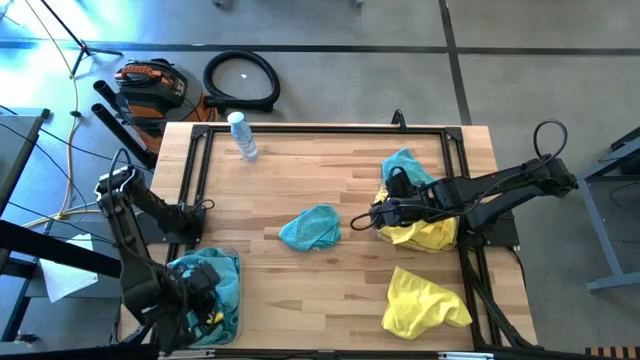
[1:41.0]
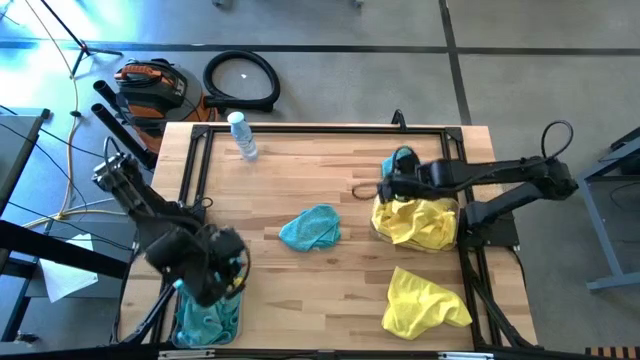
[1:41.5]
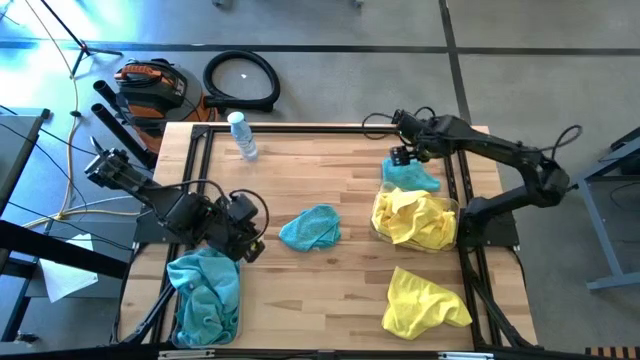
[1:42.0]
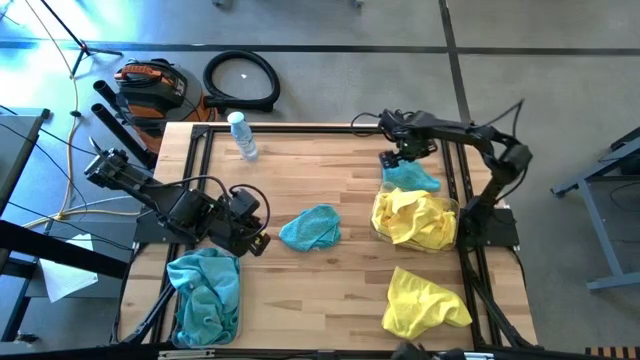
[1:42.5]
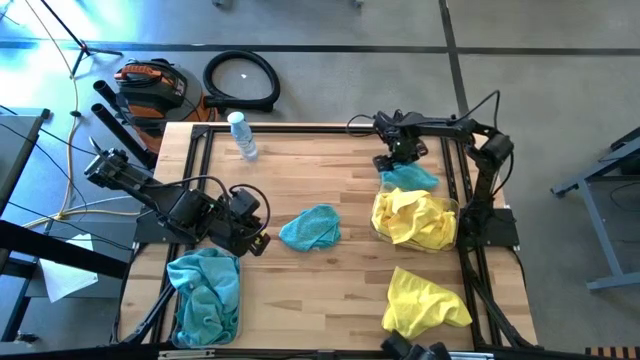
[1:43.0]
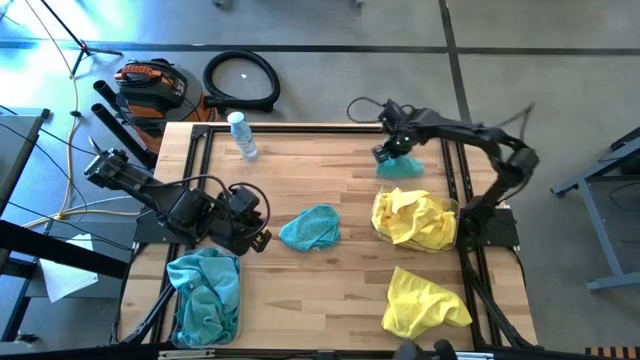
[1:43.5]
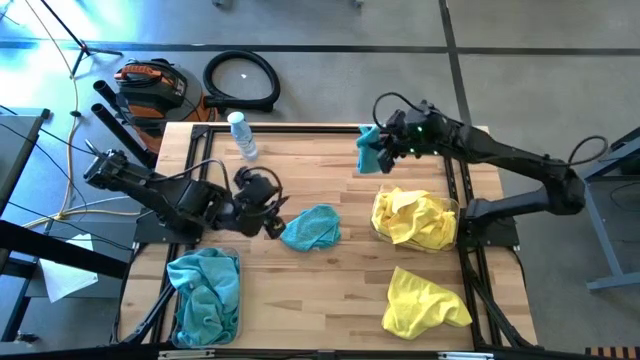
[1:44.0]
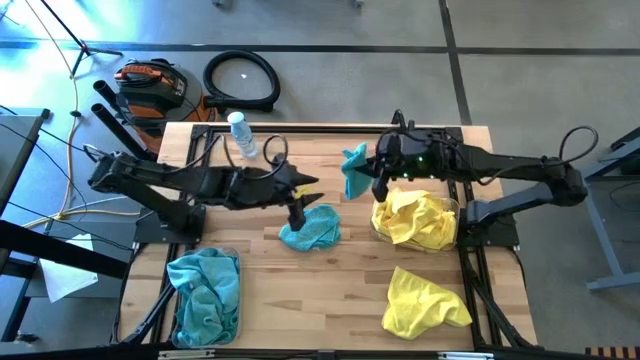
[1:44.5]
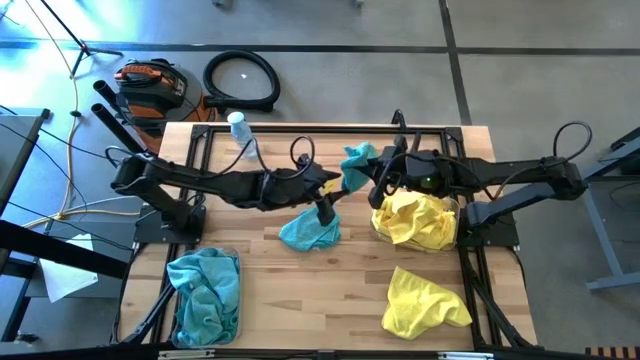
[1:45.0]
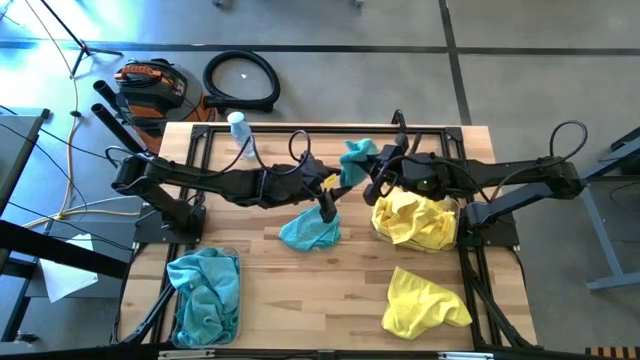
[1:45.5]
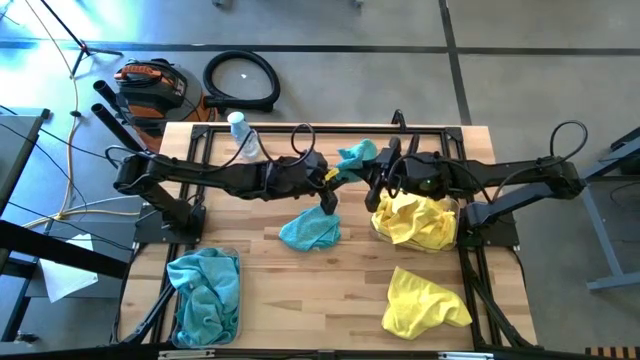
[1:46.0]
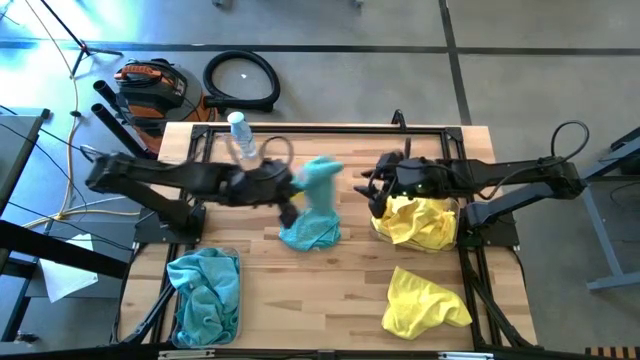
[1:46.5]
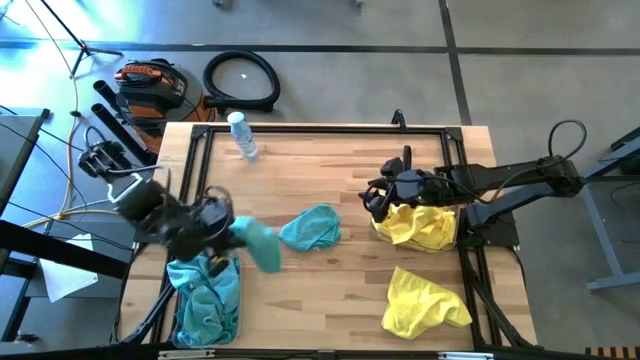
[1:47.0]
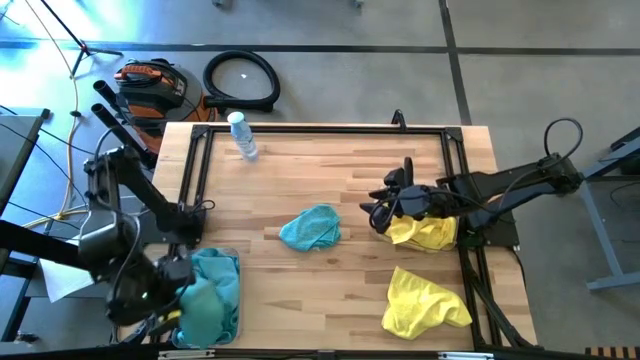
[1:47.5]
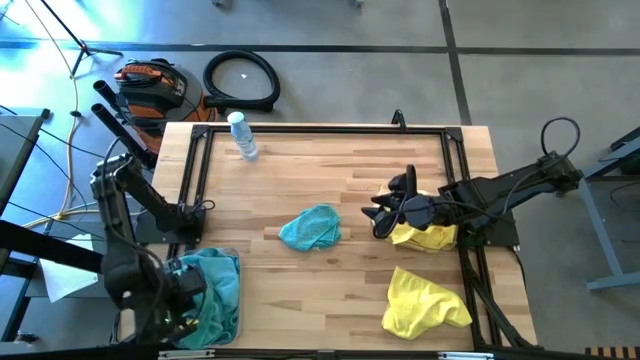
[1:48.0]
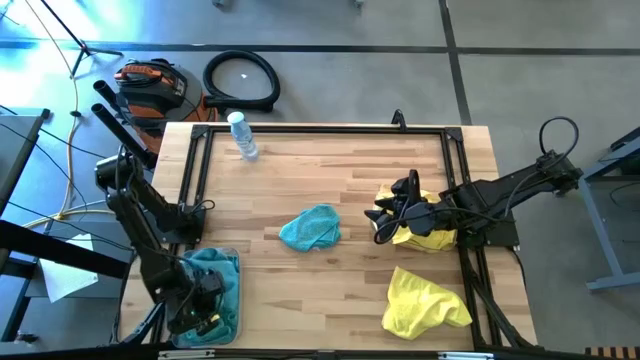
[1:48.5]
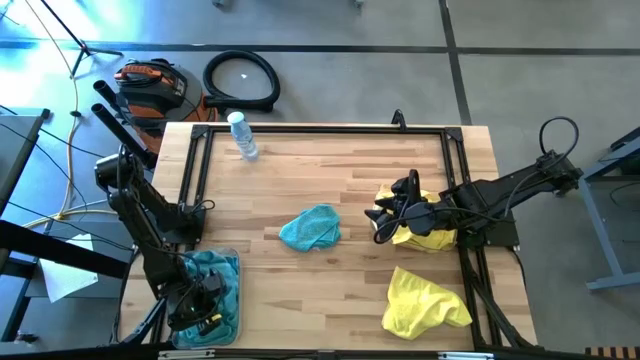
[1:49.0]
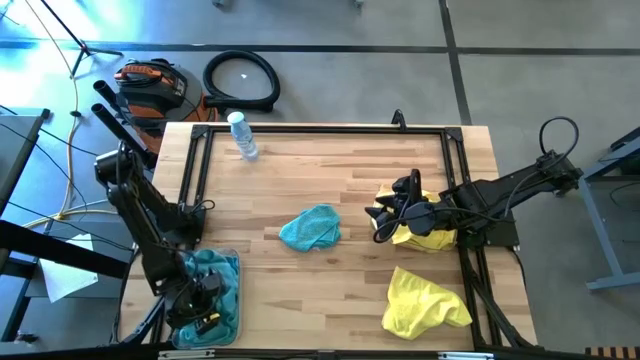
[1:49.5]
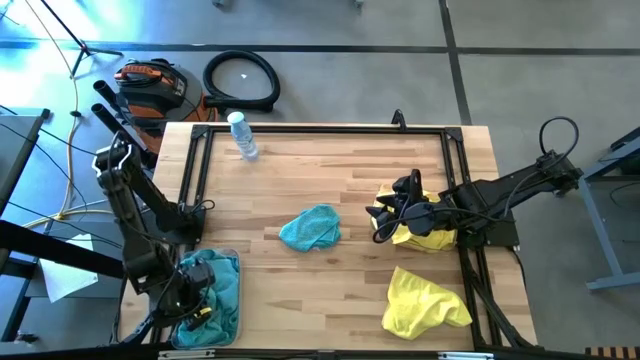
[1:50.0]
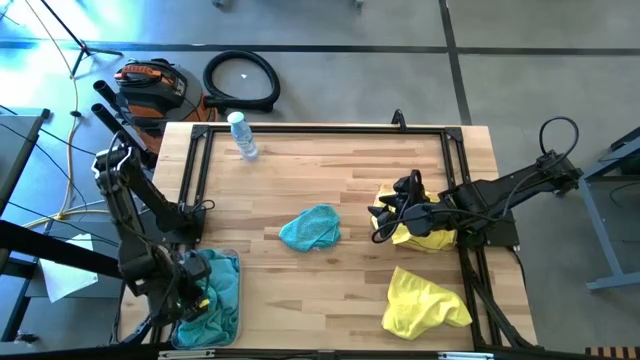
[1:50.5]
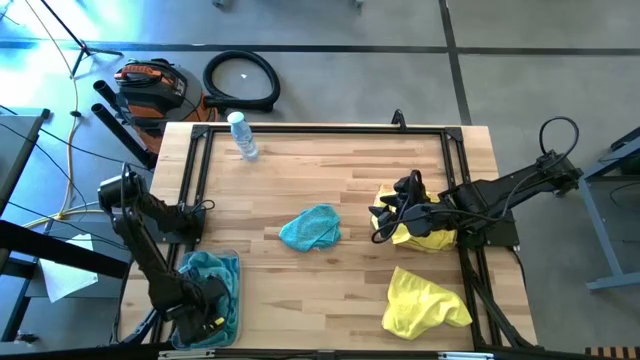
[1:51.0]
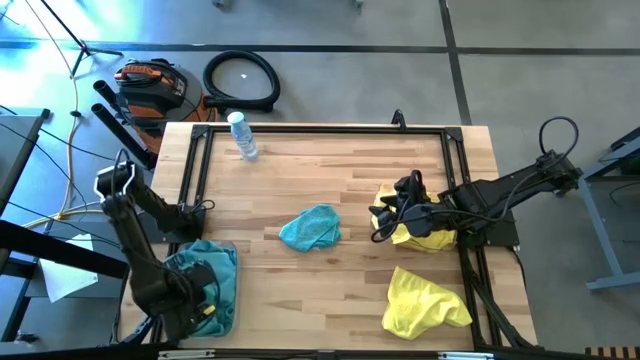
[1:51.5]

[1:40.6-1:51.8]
Task: Sort microfiber towel by color & place in baskets
Put the blue microfiber towel into the left transparent bin

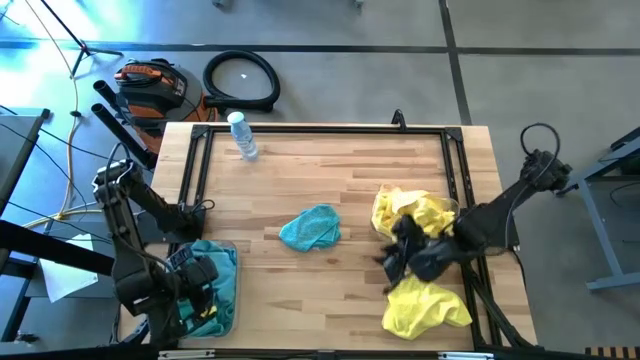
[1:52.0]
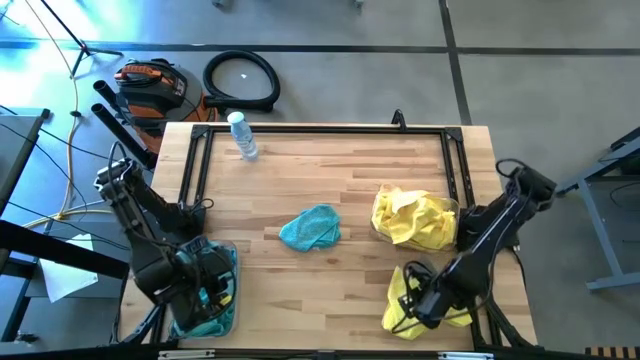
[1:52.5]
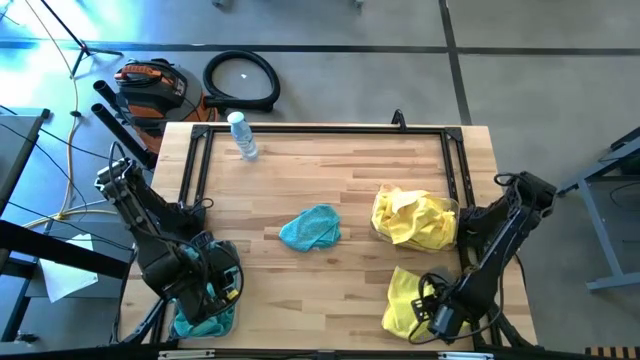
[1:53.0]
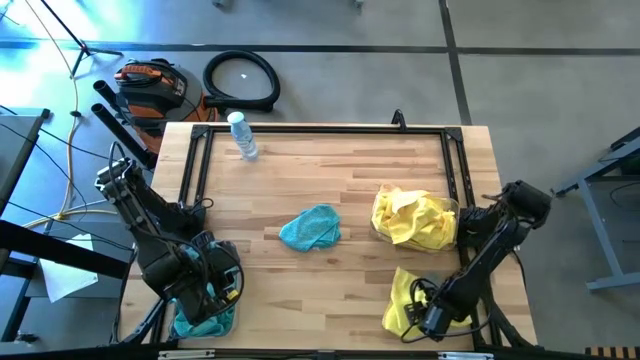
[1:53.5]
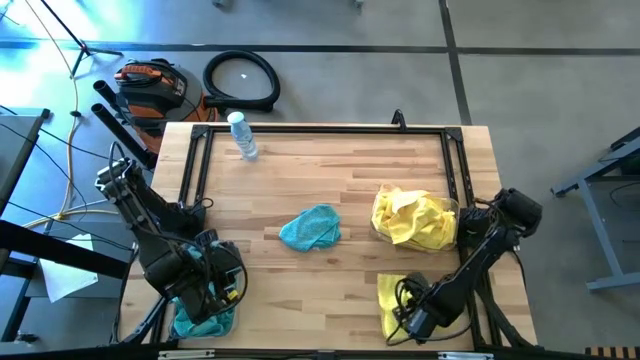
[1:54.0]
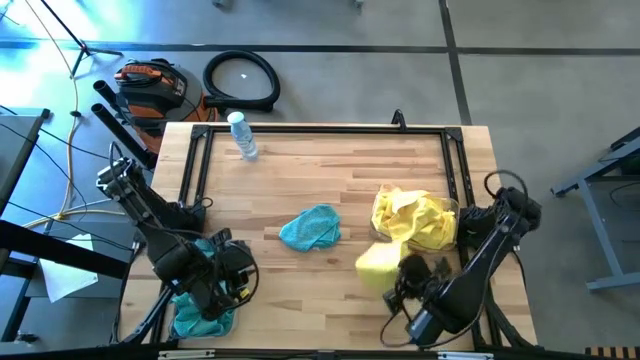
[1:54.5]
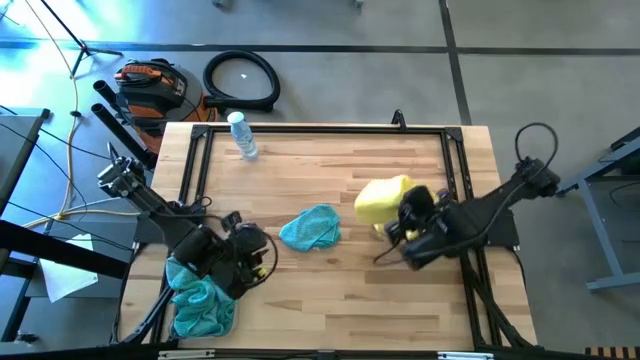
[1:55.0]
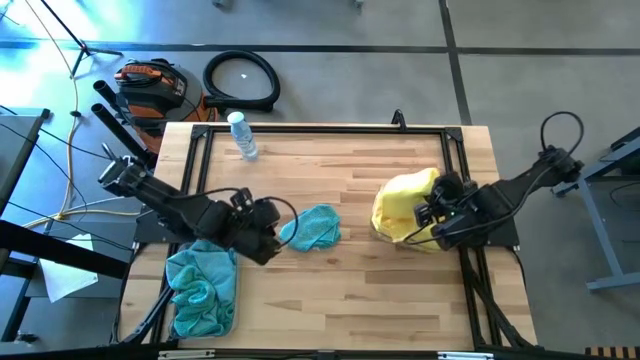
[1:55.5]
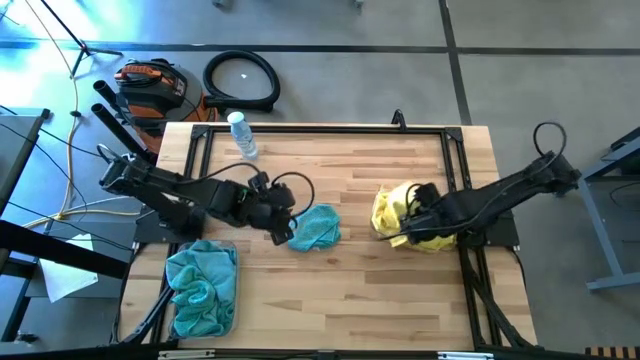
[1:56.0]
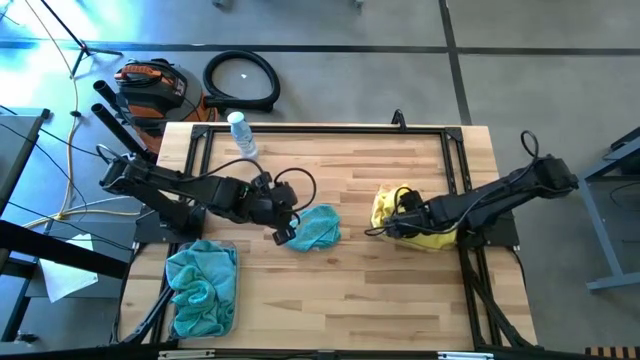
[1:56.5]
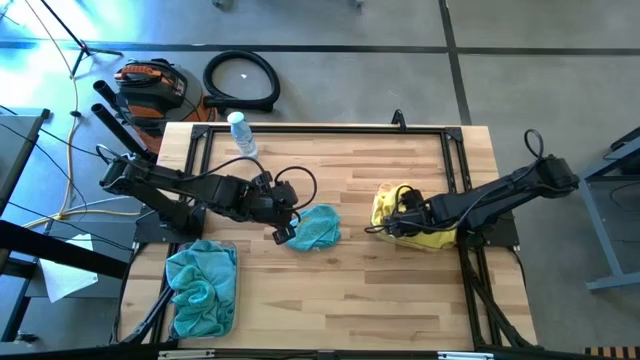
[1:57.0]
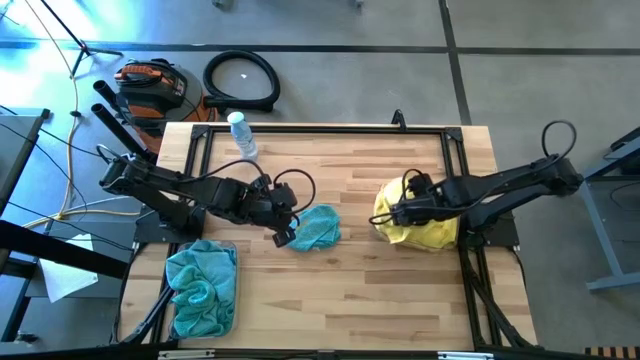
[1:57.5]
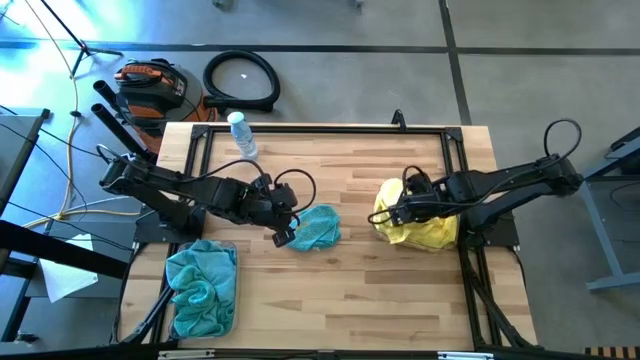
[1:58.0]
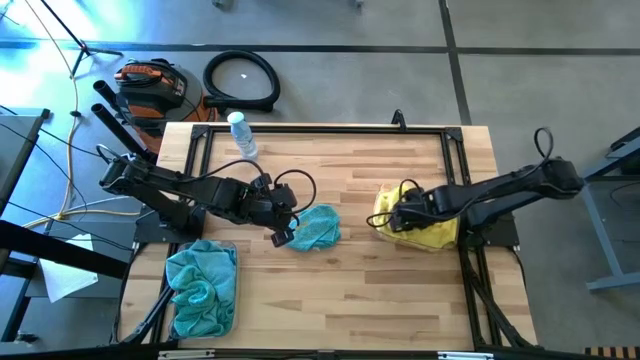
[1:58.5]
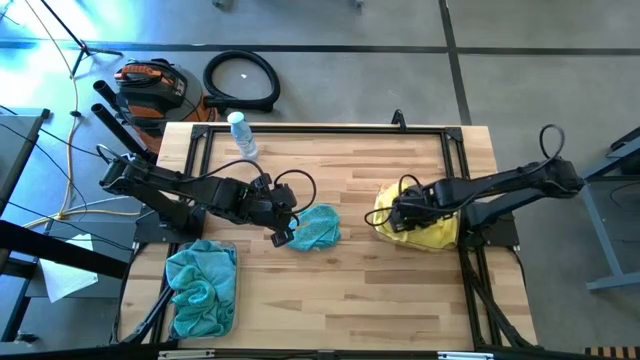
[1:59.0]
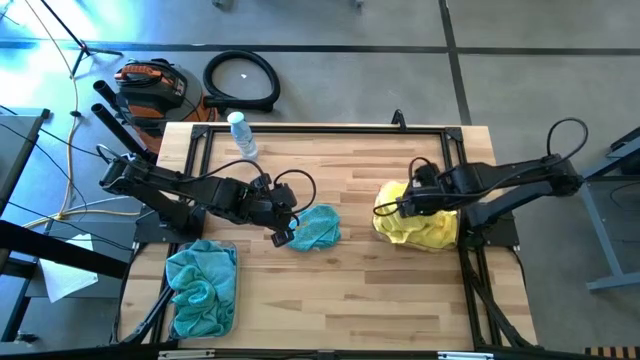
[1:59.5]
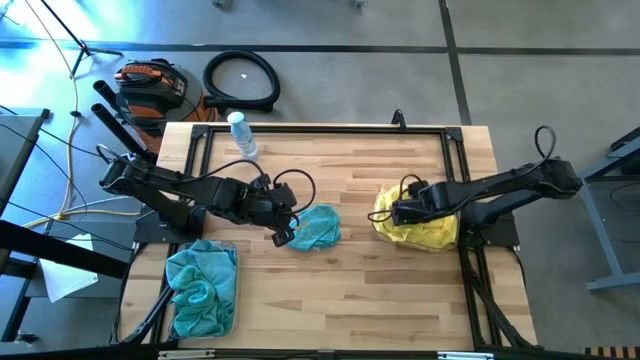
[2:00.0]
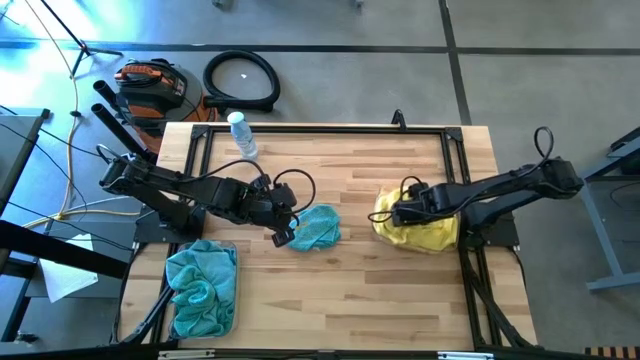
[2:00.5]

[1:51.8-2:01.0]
Put the yellow microfiber towel into the right transparent bin

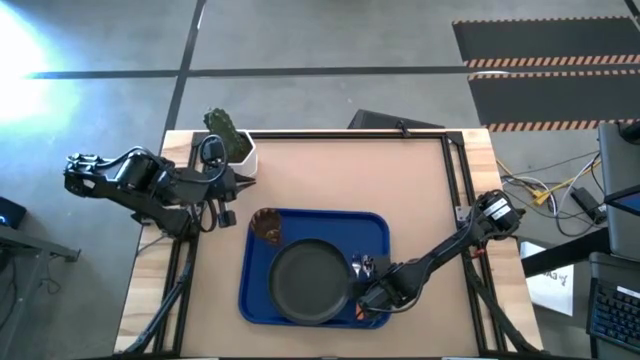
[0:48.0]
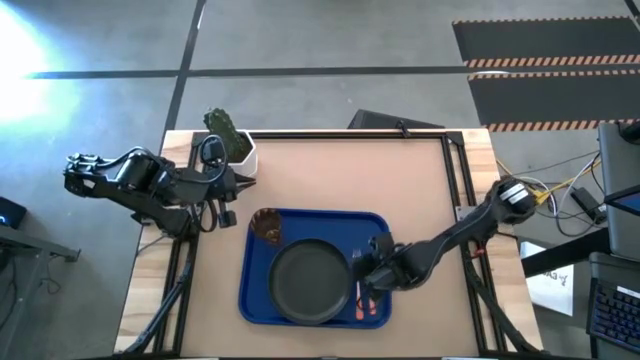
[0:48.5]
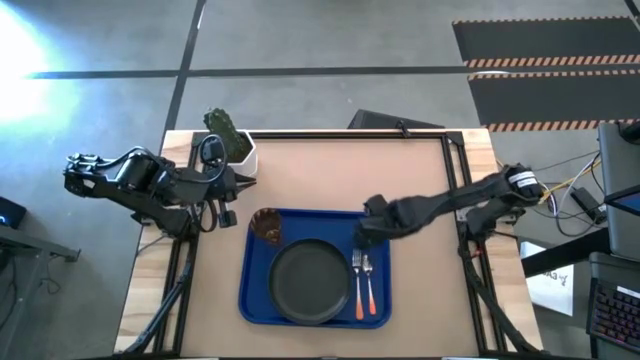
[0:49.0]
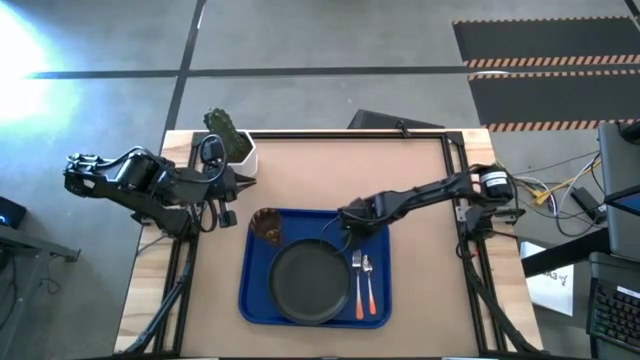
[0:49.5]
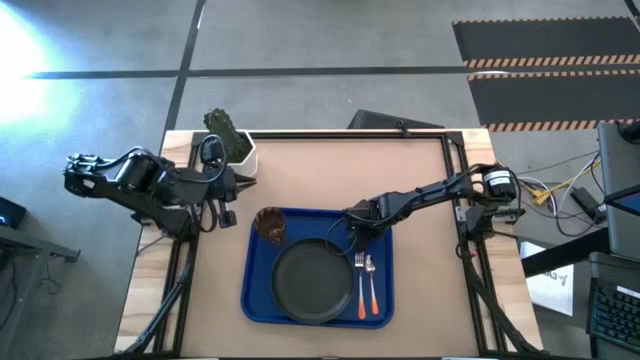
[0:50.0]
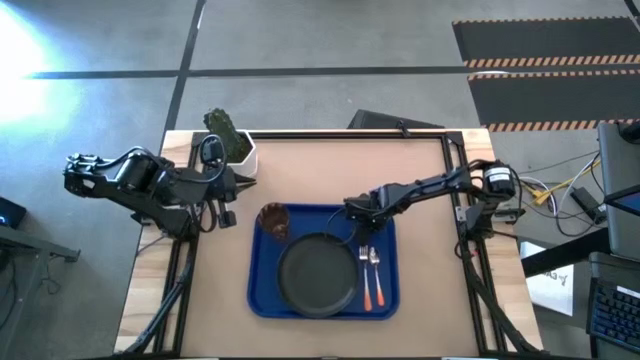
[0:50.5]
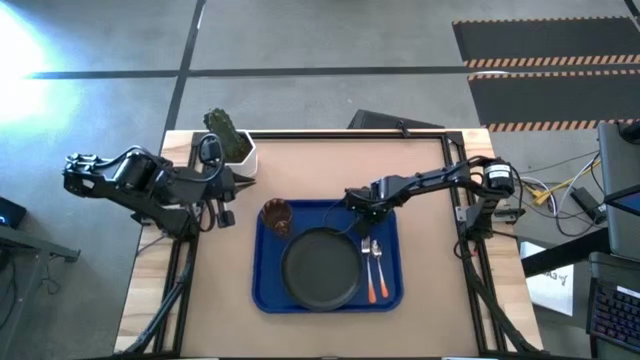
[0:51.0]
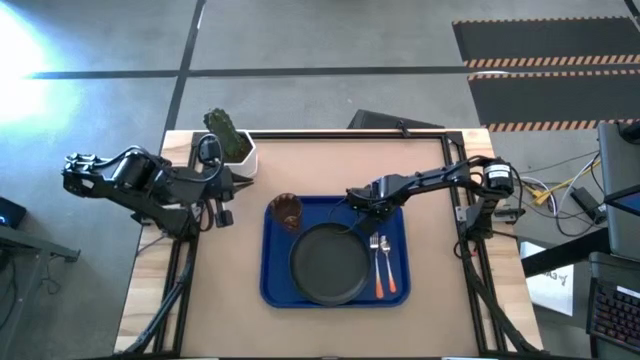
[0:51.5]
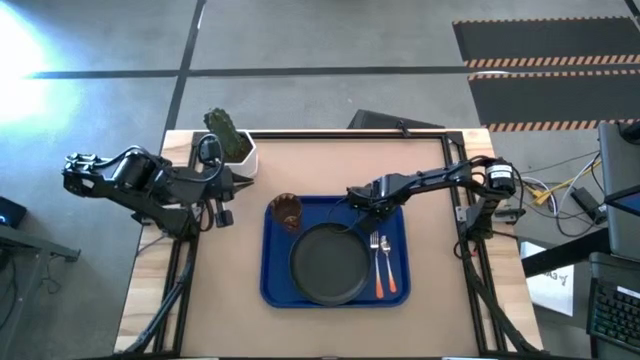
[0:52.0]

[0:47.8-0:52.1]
Task: Pick and place plate/cup/fork/spoon on tray
Adjust the blue serving tray
